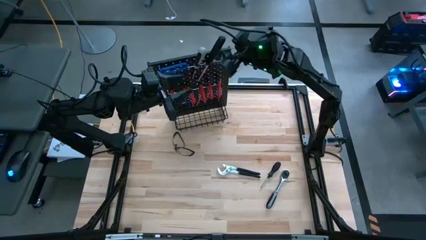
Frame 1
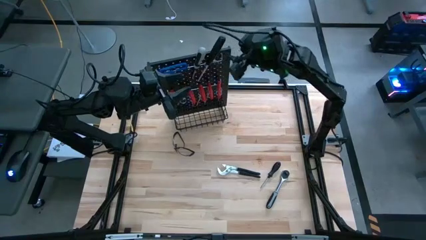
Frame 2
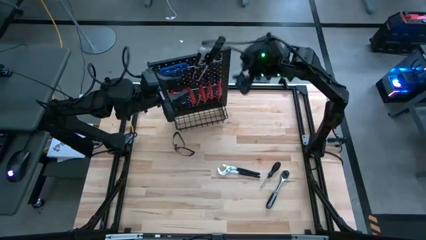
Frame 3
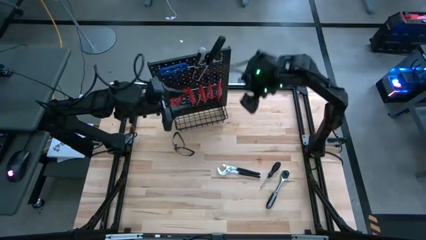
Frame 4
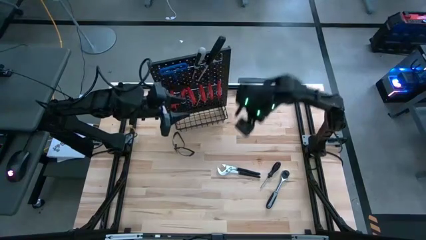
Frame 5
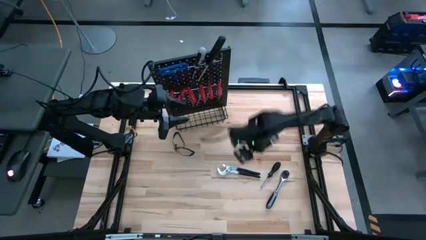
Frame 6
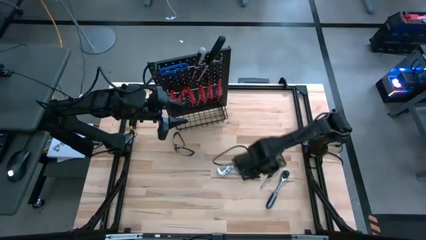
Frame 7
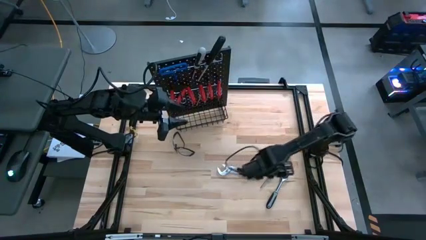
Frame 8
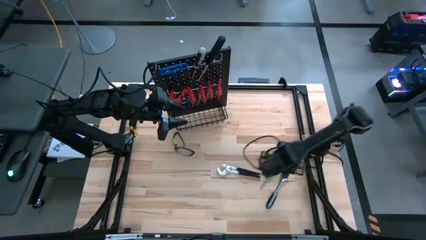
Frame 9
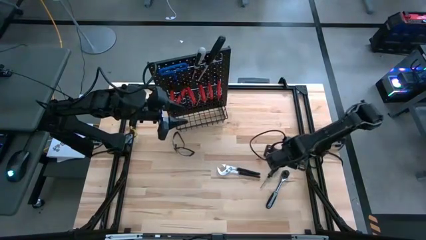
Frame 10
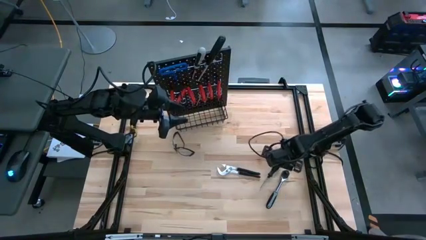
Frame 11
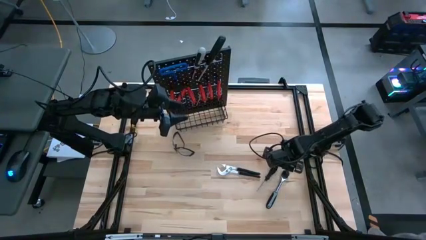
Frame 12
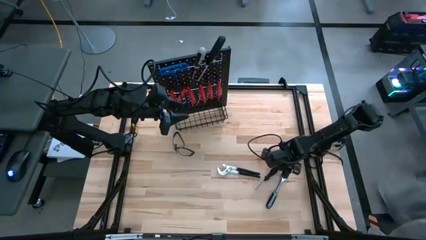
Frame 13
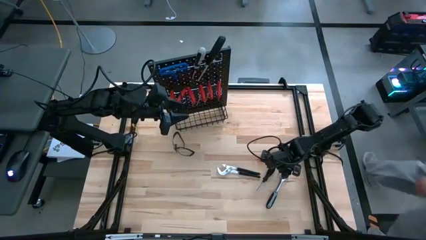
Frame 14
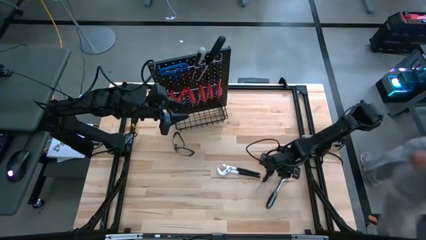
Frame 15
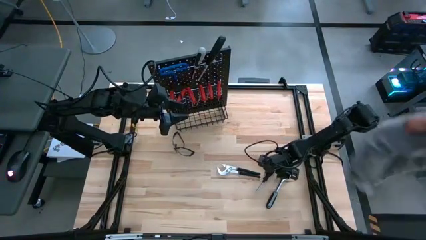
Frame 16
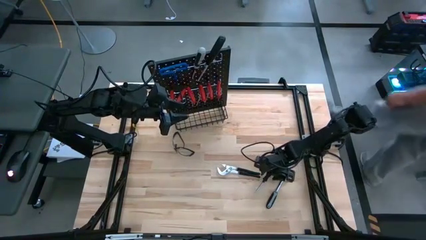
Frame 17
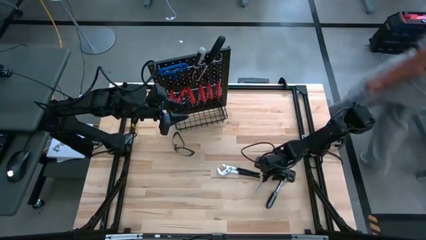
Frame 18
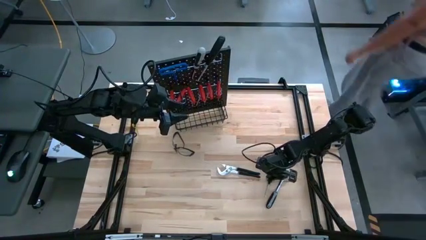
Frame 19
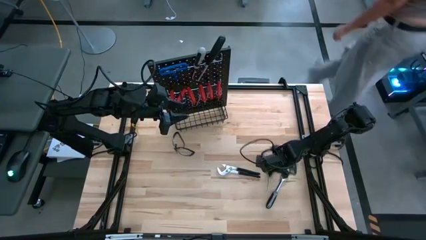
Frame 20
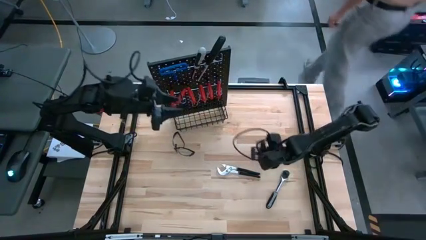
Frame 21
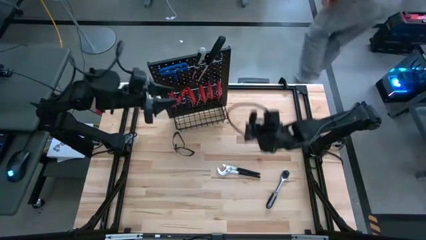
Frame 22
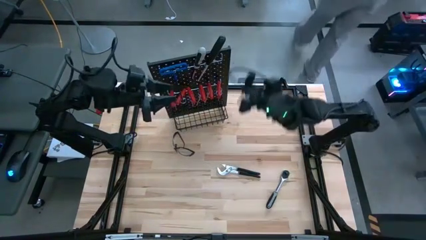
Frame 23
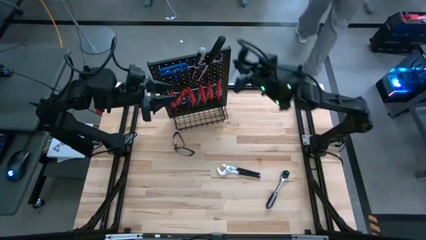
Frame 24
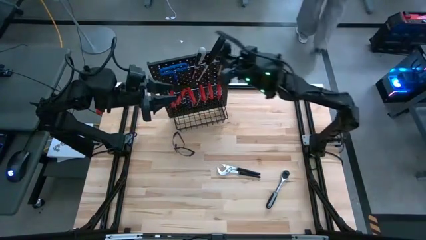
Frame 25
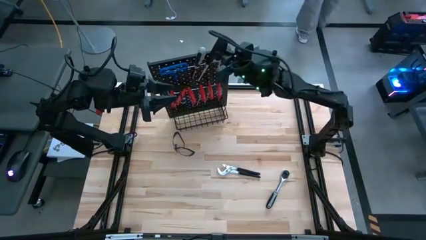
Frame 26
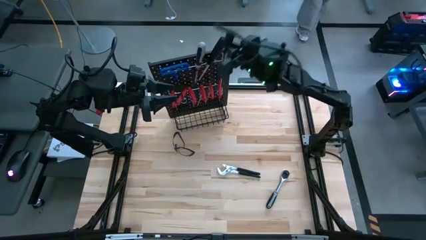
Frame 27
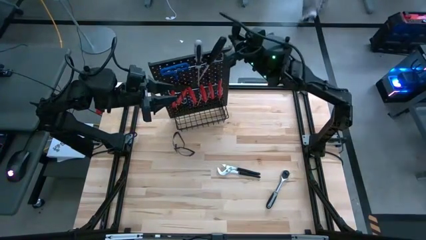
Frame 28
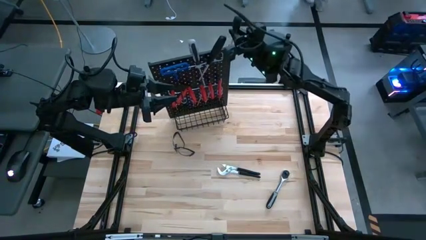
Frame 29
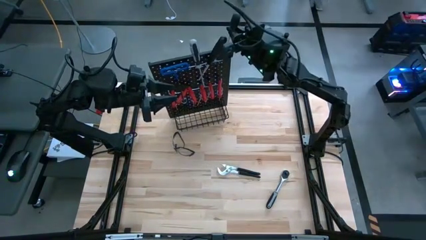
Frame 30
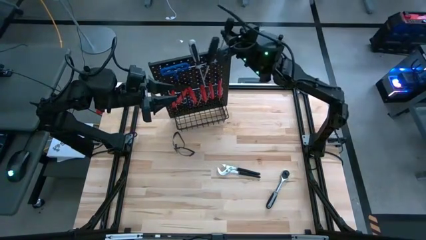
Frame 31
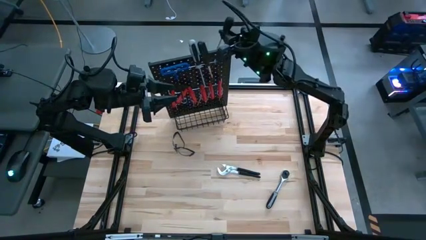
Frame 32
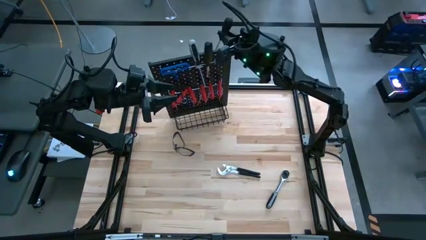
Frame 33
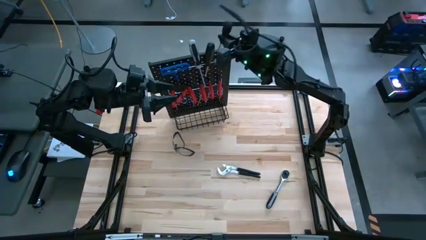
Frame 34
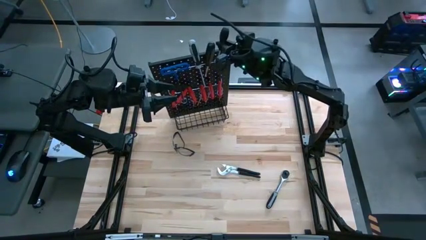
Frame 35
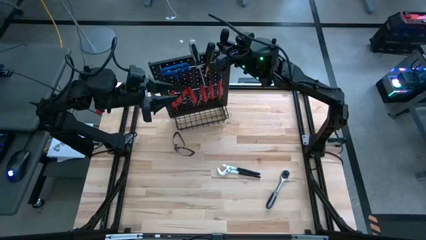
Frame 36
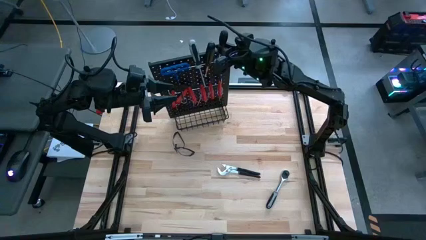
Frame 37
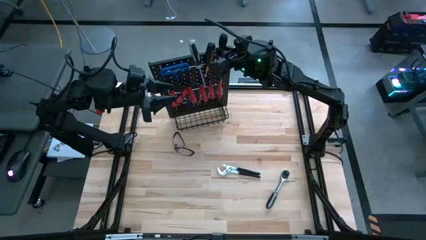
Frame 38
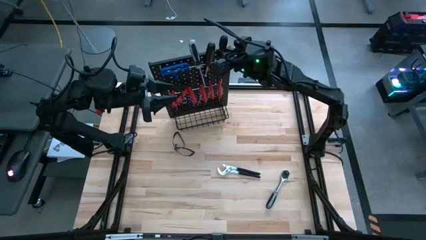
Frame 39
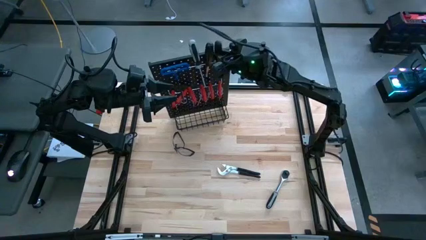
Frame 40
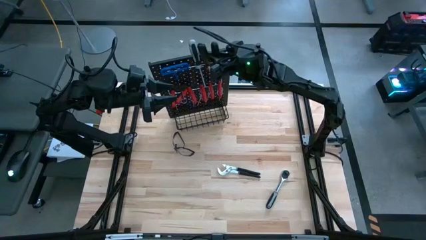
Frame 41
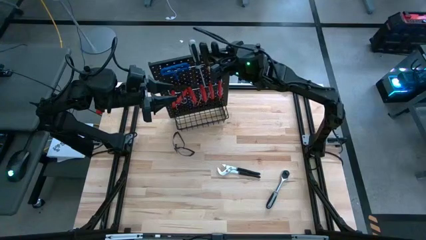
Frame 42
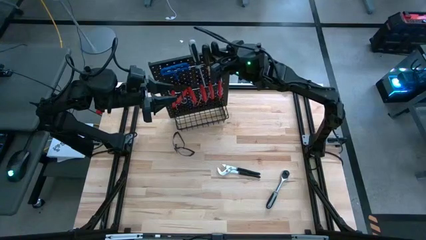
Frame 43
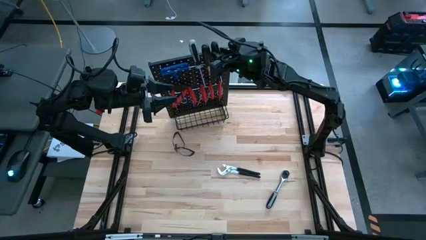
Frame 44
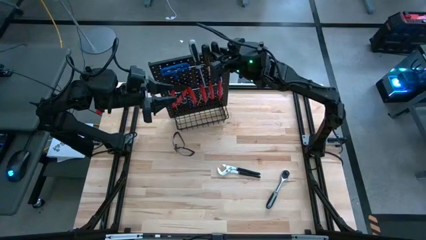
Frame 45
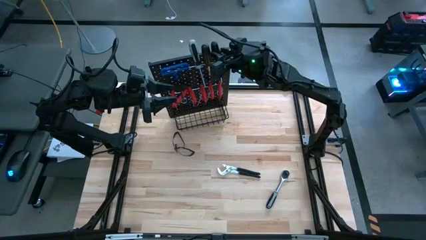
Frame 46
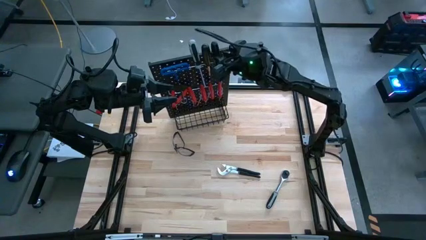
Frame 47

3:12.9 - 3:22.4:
Task: Hang tools onto peg board
Hang the black screwdriver on the peg board

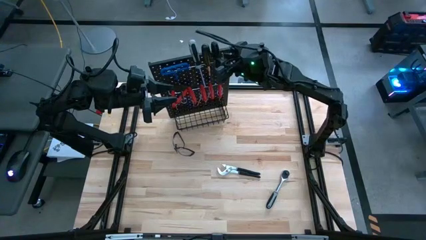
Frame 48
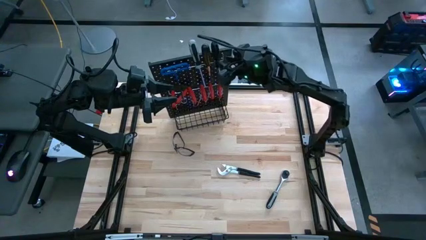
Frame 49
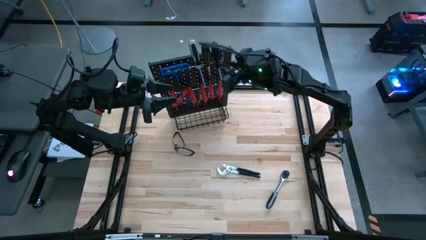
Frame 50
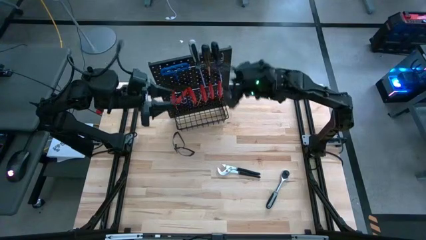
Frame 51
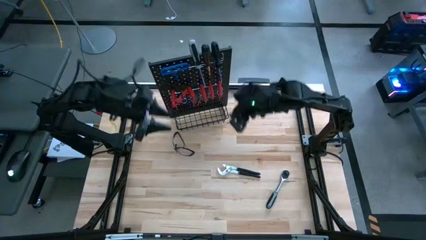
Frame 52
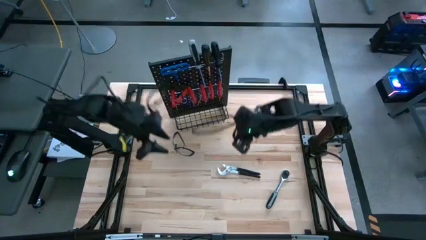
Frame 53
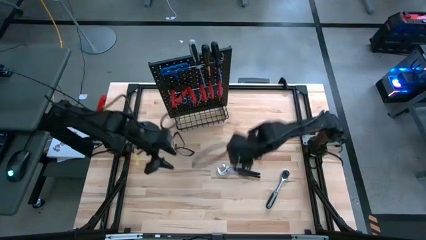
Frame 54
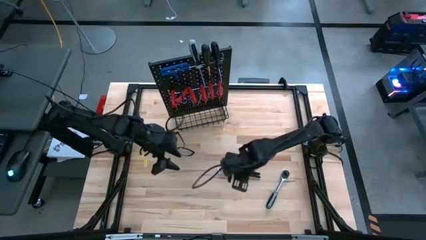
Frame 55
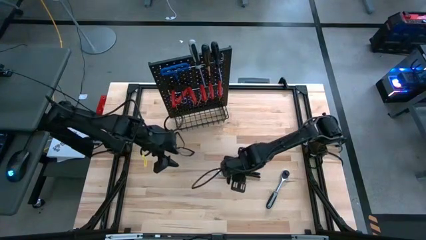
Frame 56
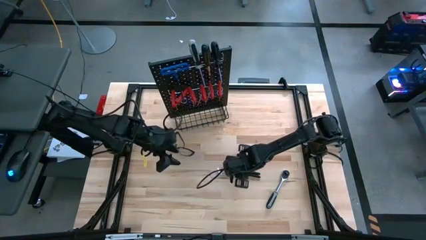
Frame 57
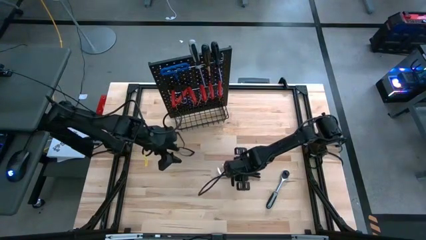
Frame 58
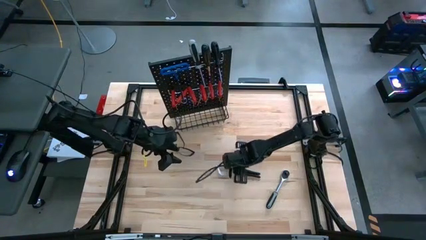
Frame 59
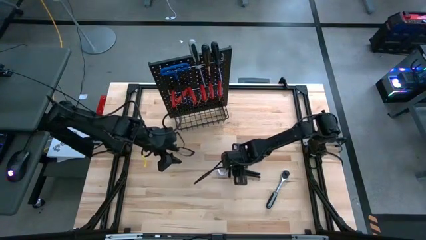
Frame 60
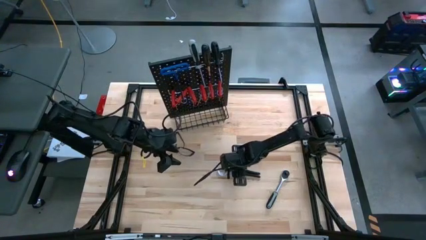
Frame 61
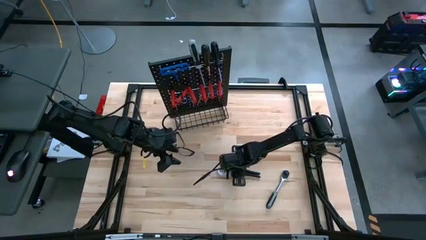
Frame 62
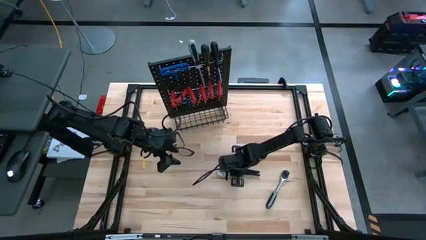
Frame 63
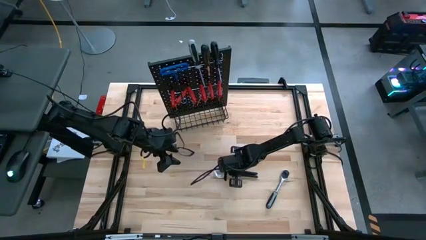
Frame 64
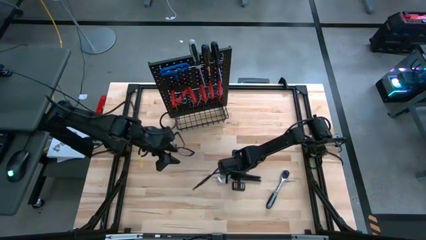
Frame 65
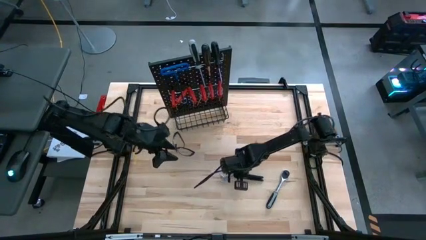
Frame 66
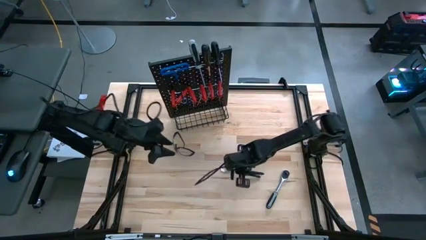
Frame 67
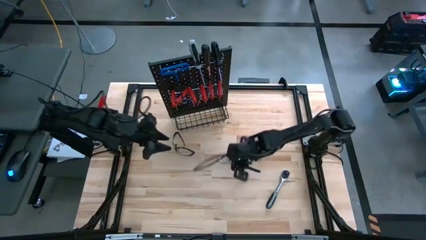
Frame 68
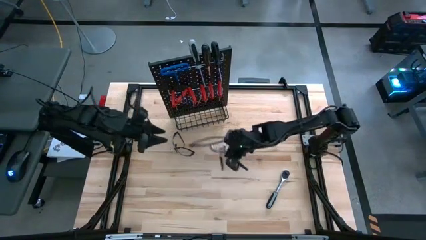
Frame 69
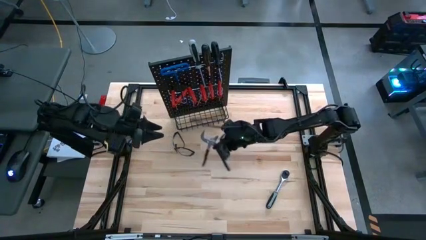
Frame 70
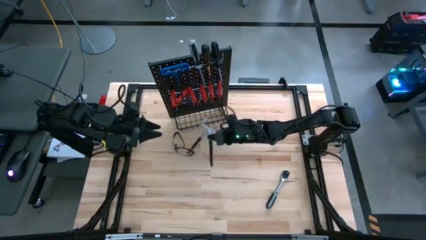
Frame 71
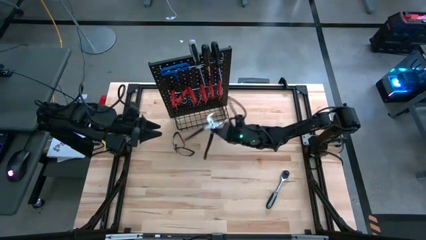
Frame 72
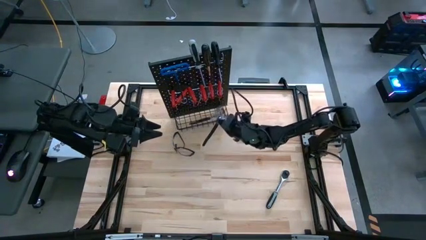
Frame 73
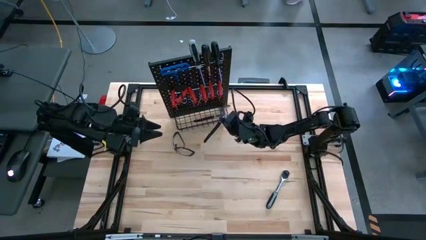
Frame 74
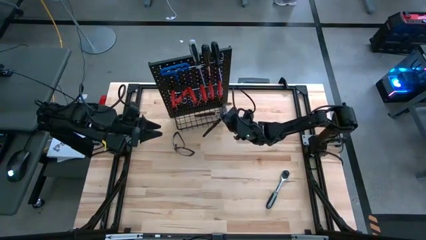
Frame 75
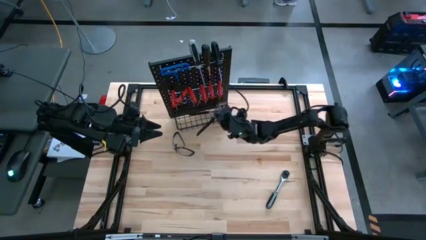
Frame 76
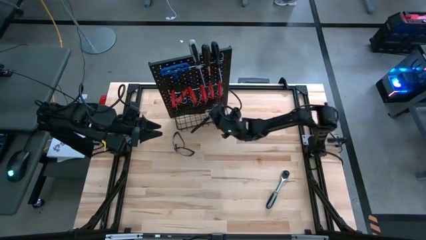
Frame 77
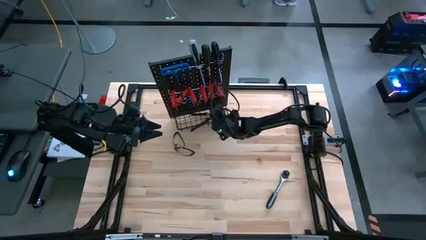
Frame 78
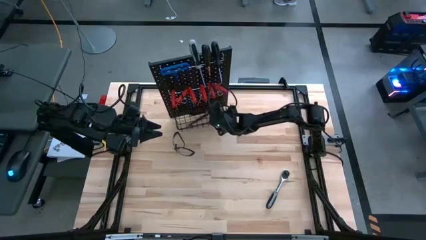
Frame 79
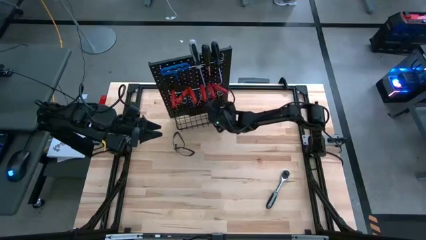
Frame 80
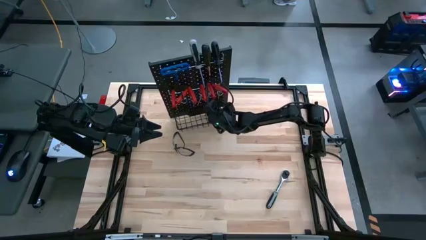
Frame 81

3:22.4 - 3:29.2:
Put the black adjustable plier in the wire basket on the pegboard

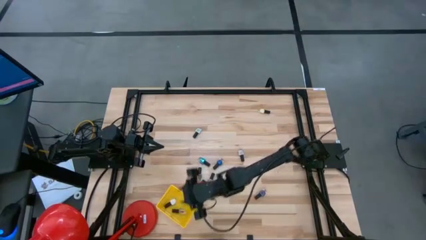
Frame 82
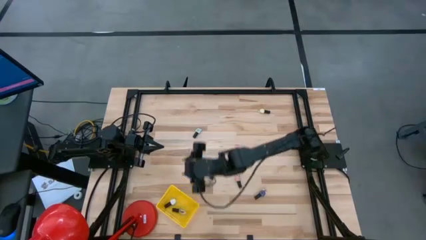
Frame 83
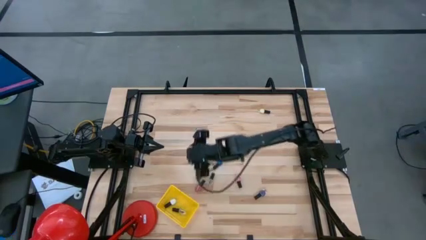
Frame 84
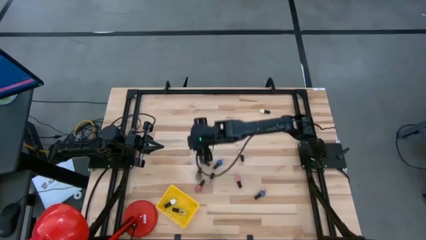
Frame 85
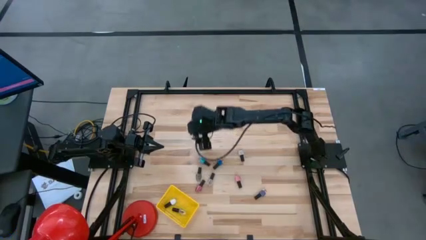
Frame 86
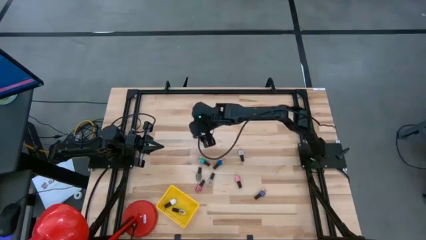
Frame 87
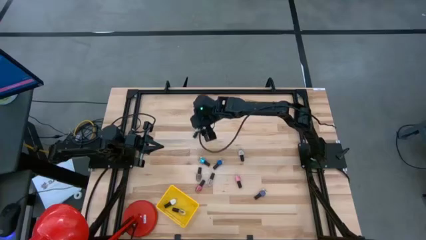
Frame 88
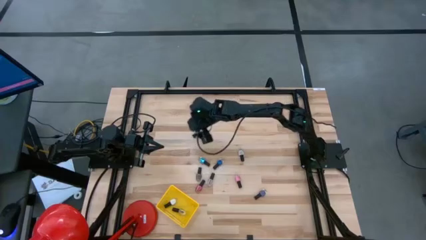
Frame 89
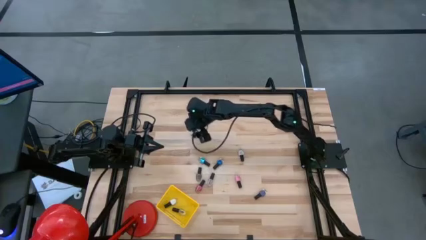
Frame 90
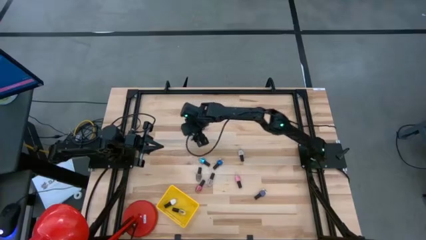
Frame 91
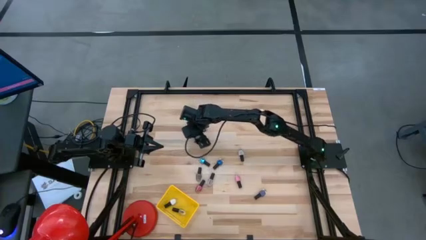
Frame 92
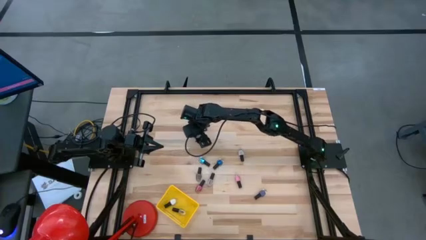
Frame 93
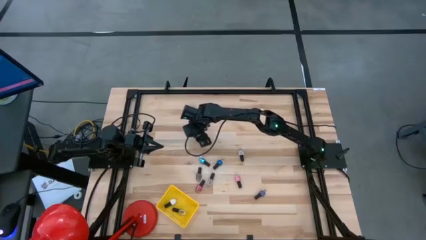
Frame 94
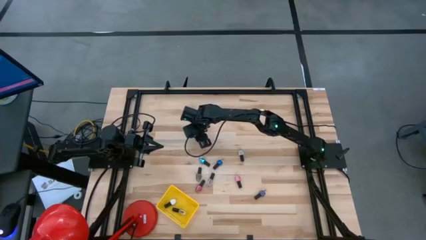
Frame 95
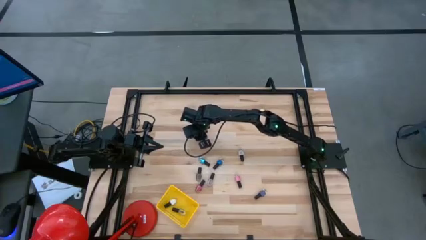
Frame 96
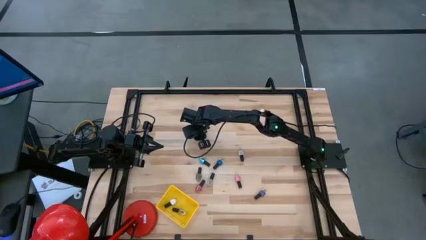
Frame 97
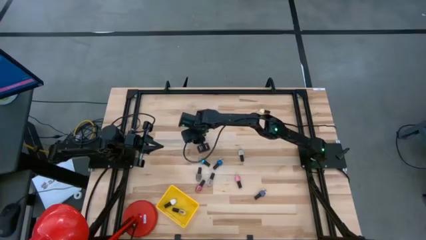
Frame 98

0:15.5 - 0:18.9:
Task: Pick & Place Nail Polish
Put the white nail polish into the yellow basket
